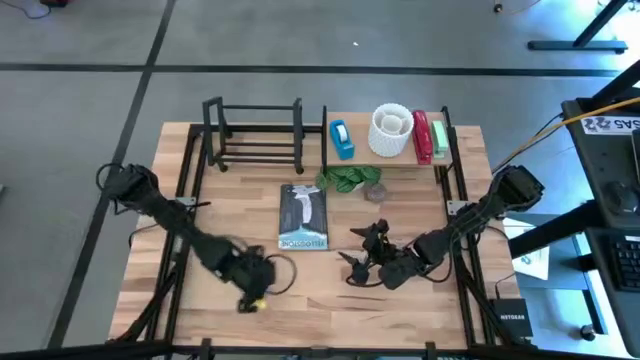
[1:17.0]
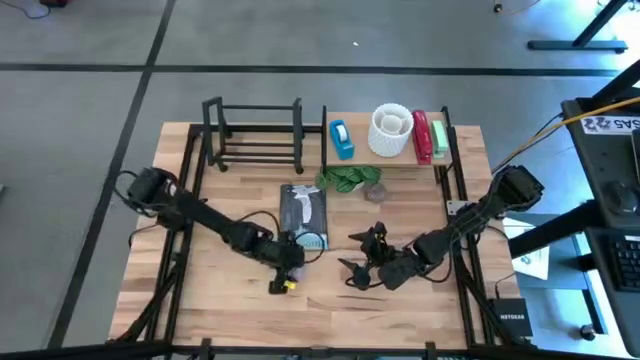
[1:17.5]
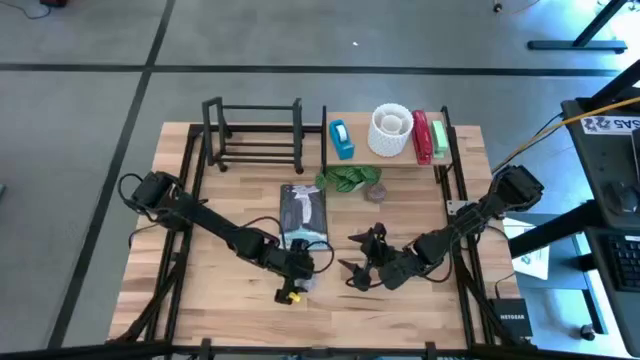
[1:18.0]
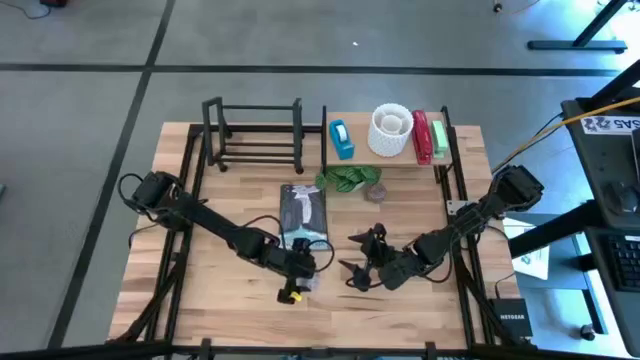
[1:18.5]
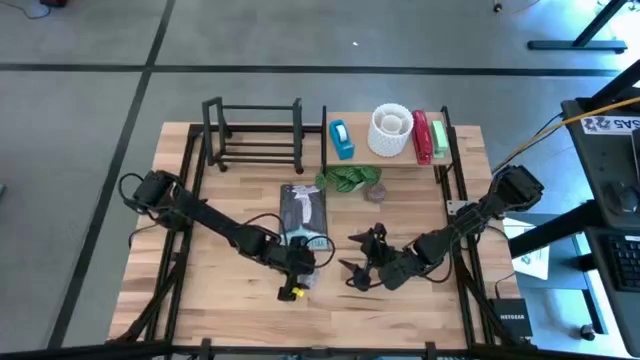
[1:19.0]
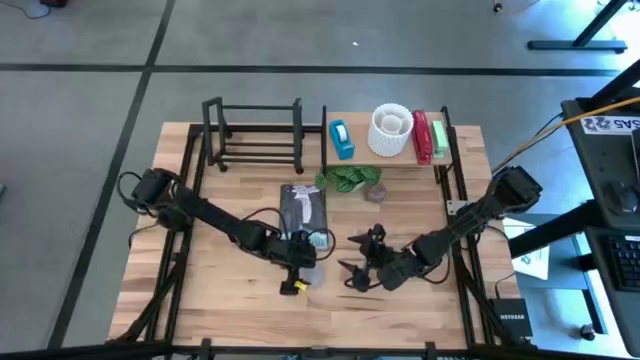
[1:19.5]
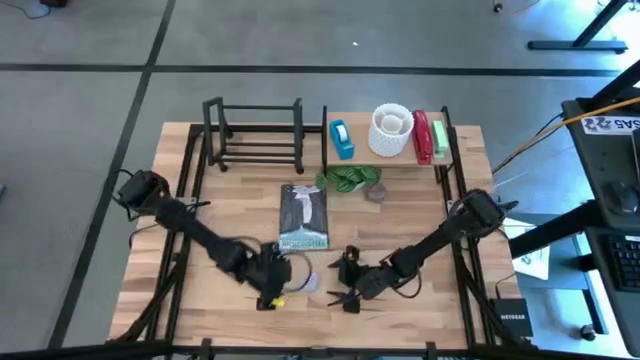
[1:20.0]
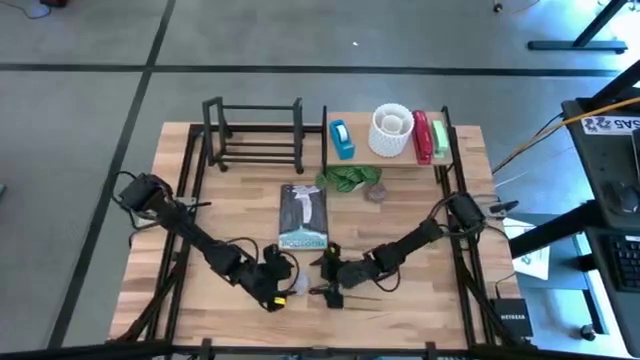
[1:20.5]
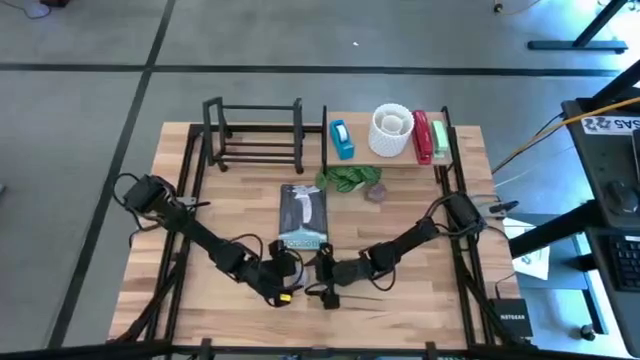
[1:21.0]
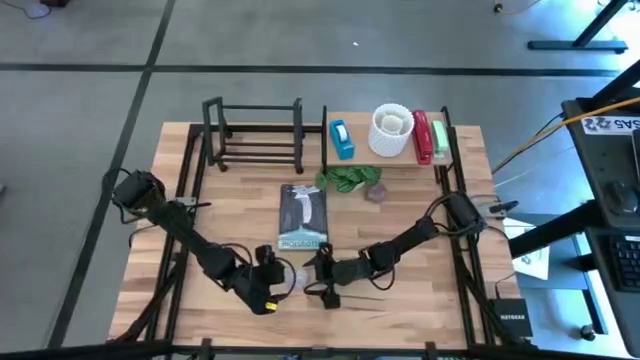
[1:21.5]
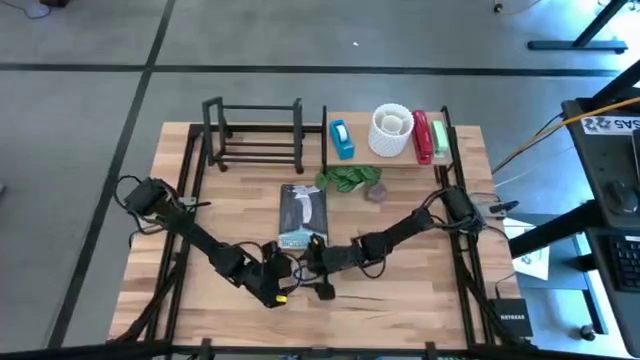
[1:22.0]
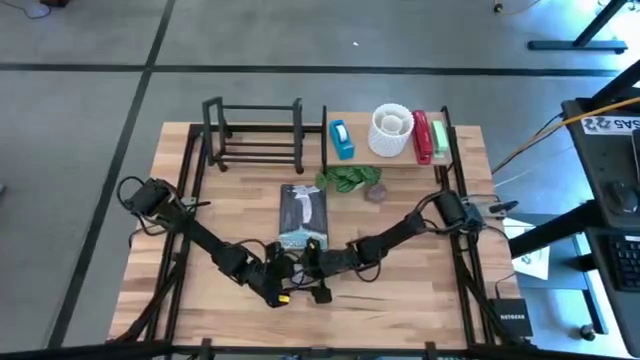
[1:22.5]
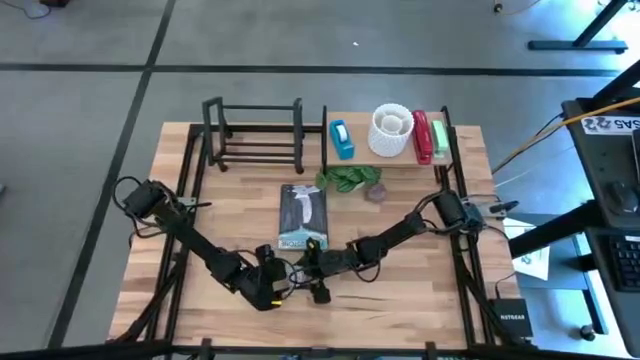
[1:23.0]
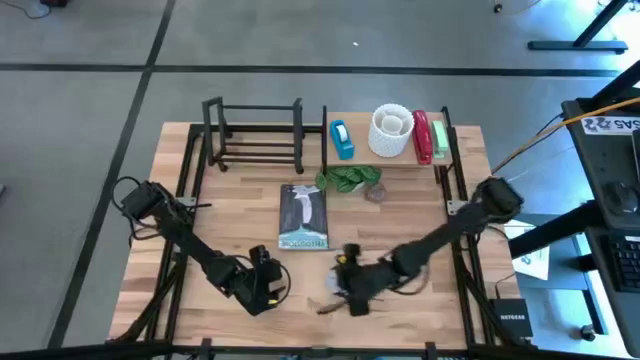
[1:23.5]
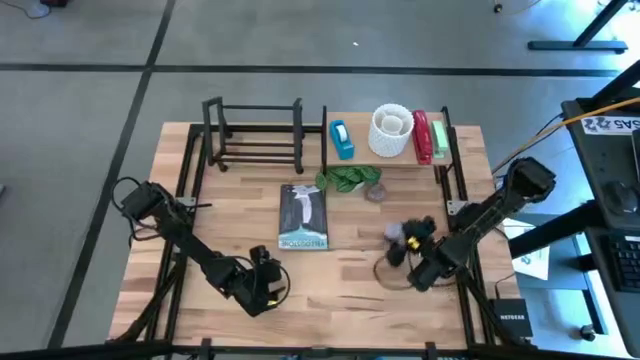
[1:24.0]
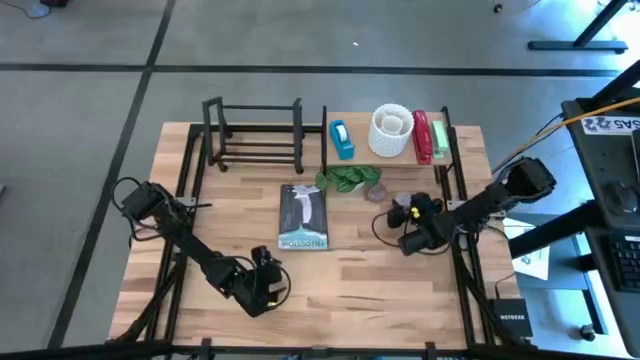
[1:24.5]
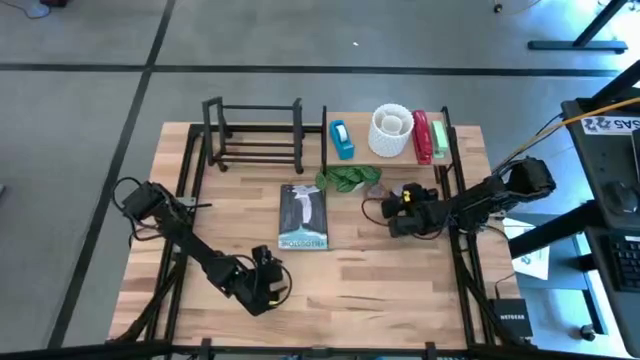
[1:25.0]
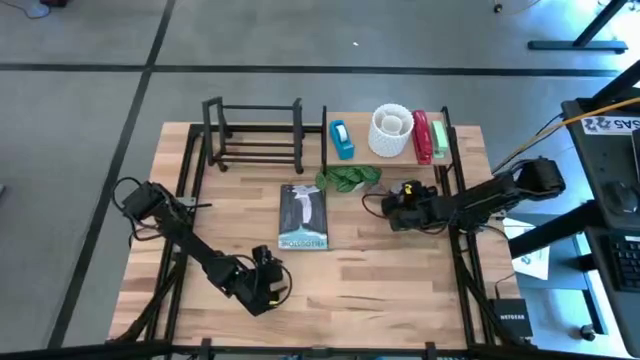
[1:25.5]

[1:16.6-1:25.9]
Task: Stock shelves
Put the white patterned scented candle below the shelf

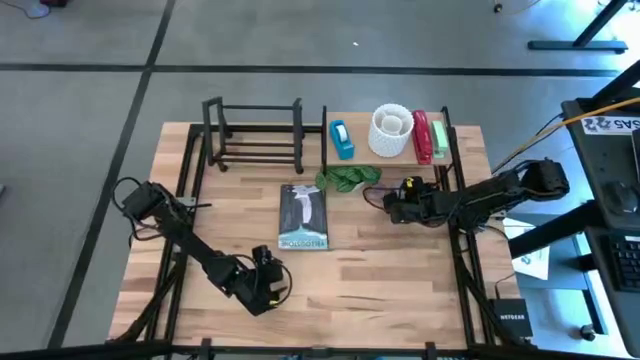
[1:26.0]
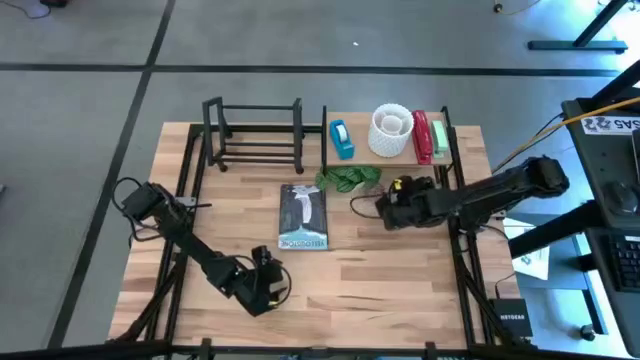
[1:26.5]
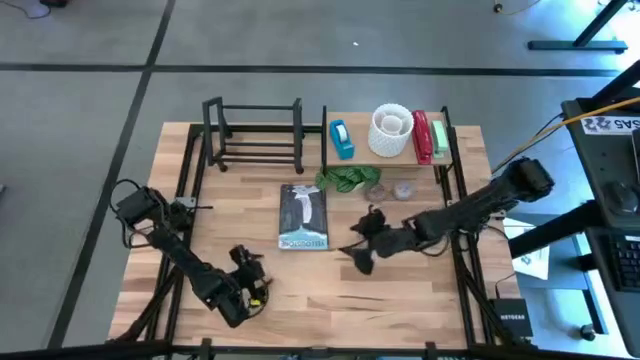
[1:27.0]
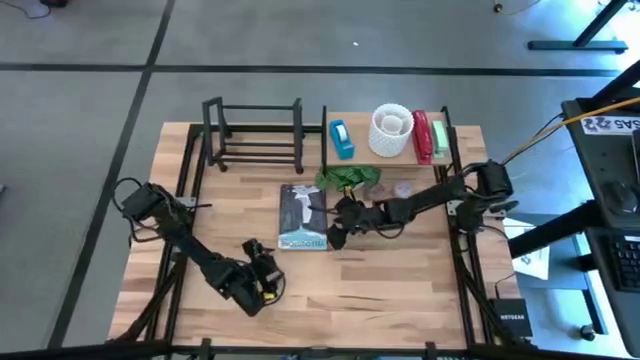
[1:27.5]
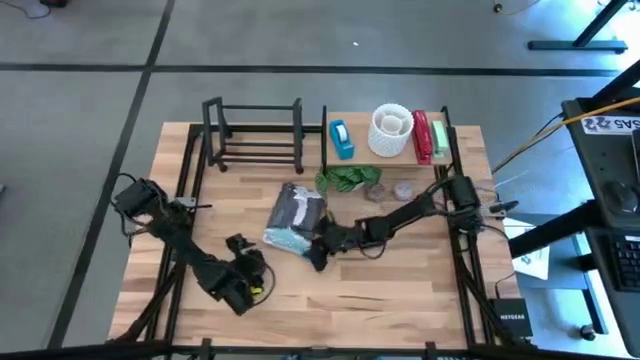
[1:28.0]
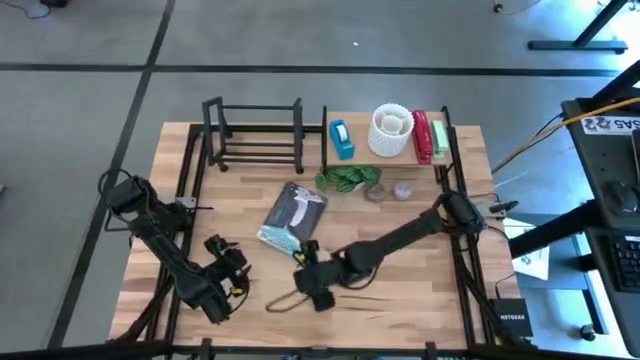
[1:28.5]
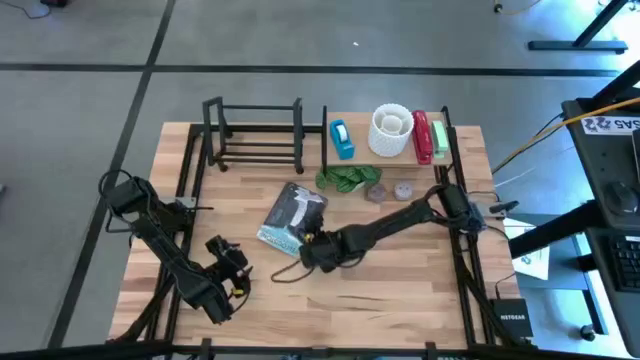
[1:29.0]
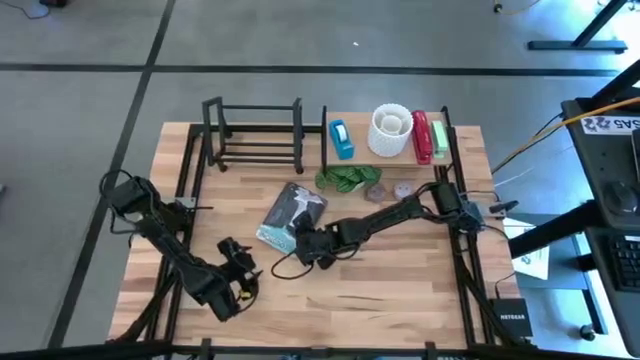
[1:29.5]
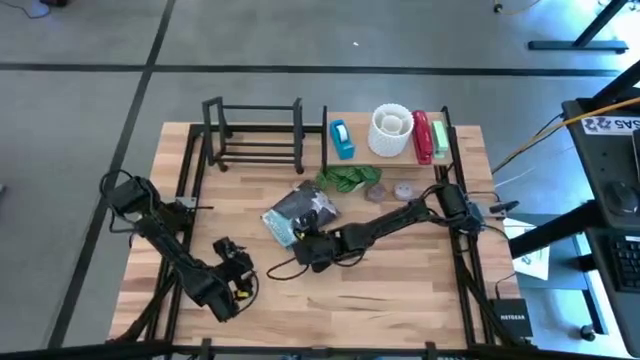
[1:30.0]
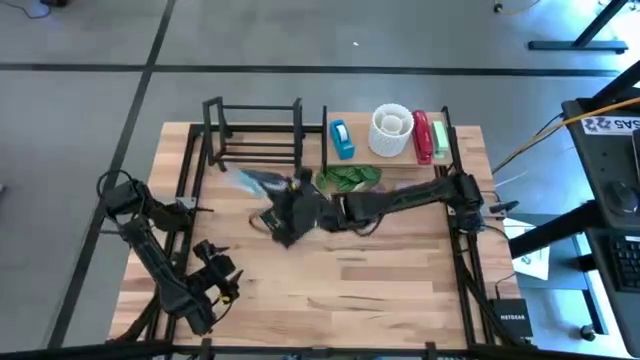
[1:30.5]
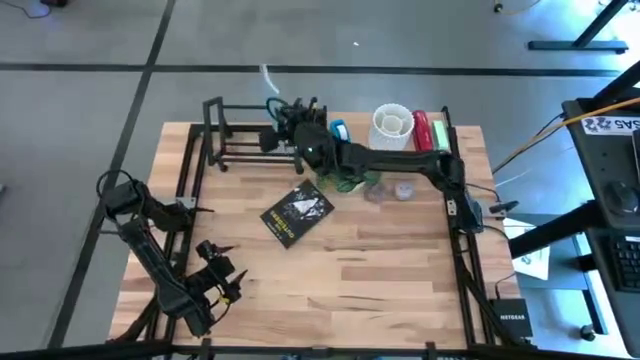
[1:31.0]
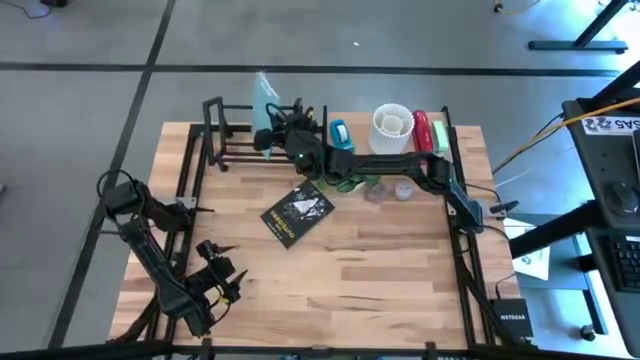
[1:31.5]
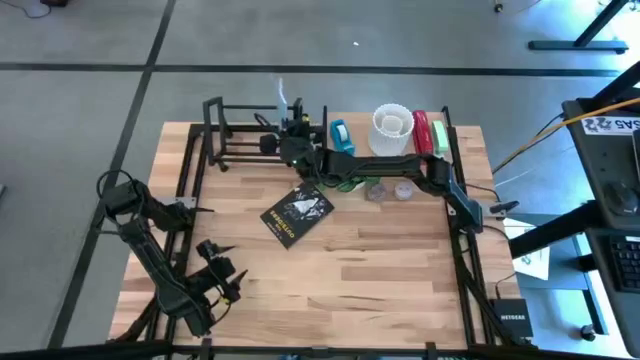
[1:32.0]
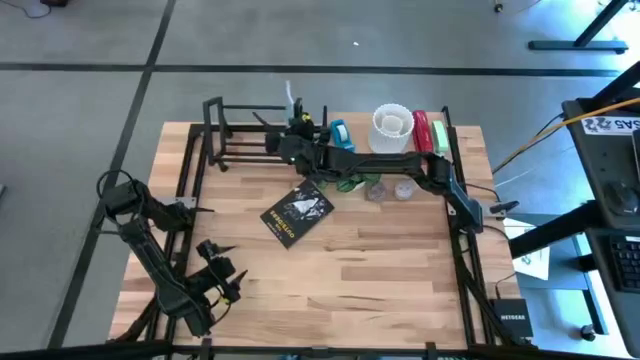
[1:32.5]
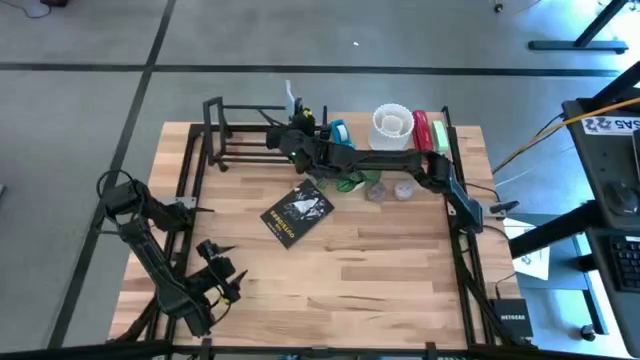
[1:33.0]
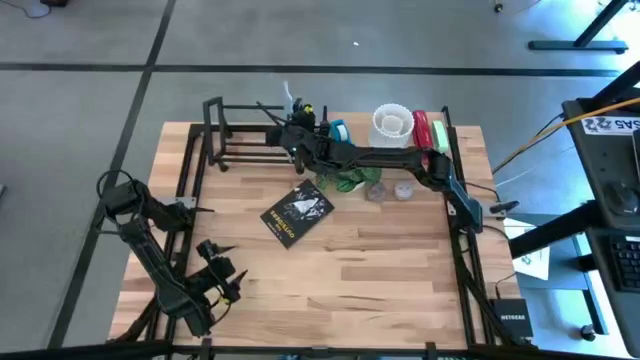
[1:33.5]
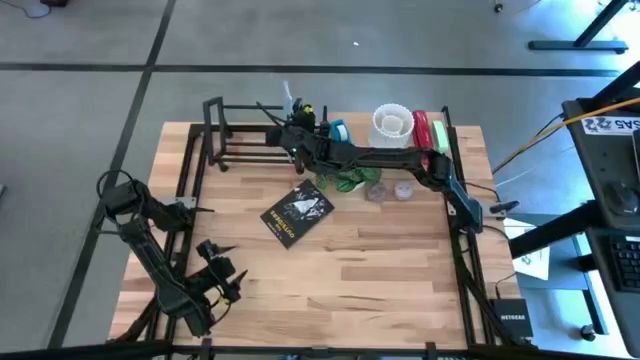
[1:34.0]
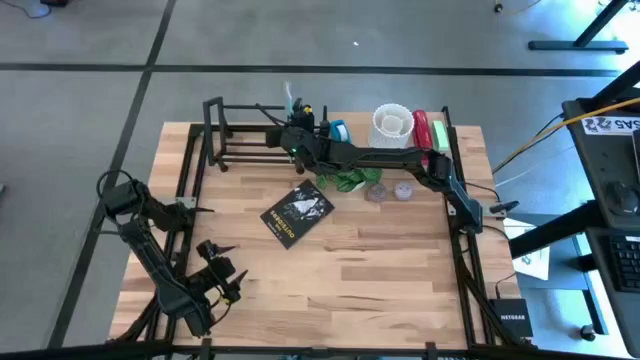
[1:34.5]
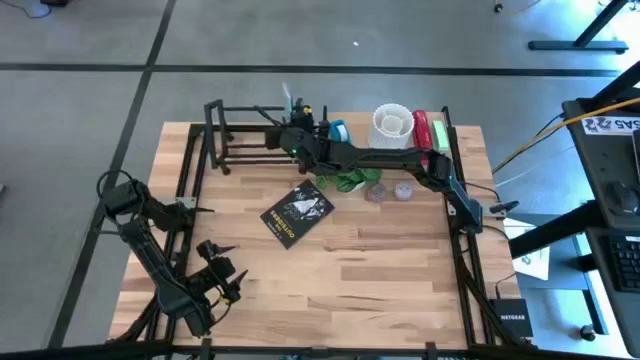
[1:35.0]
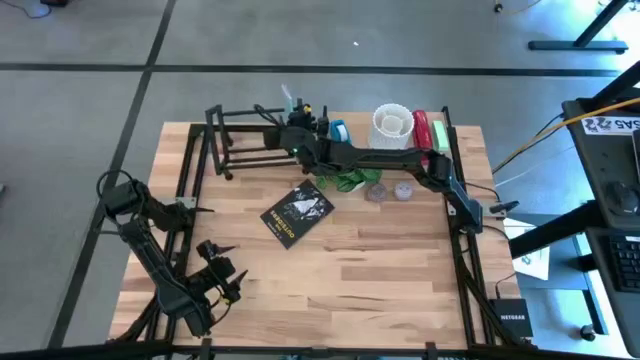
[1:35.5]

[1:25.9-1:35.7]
Put the blue book on the bookshelf

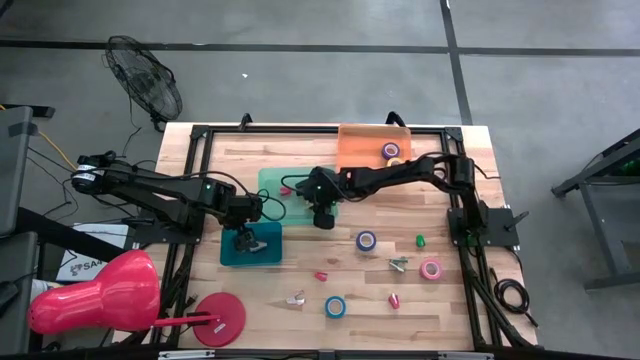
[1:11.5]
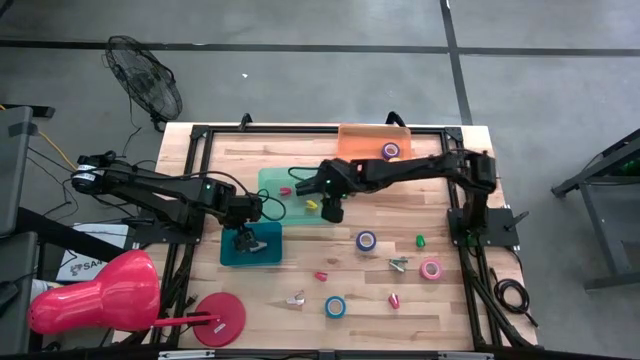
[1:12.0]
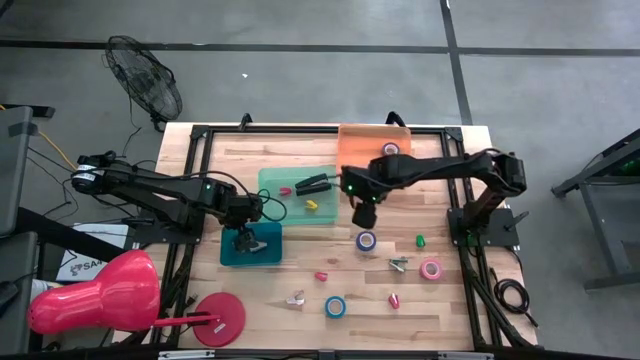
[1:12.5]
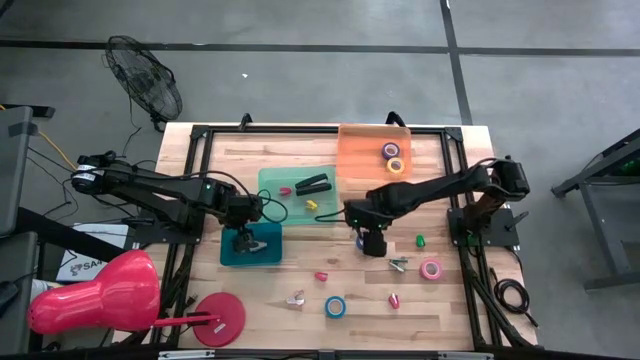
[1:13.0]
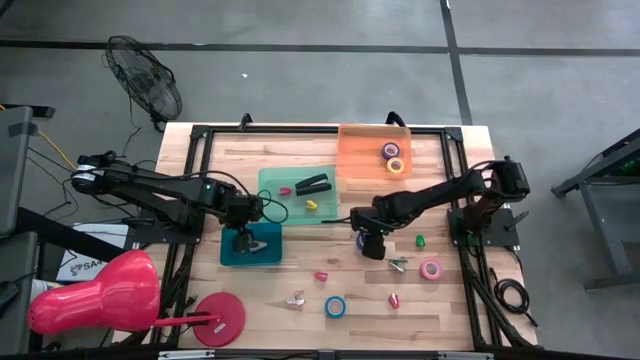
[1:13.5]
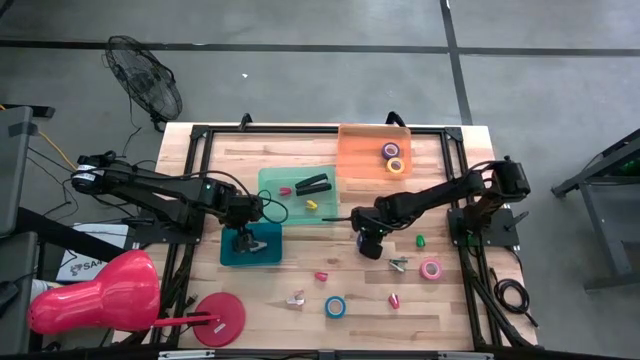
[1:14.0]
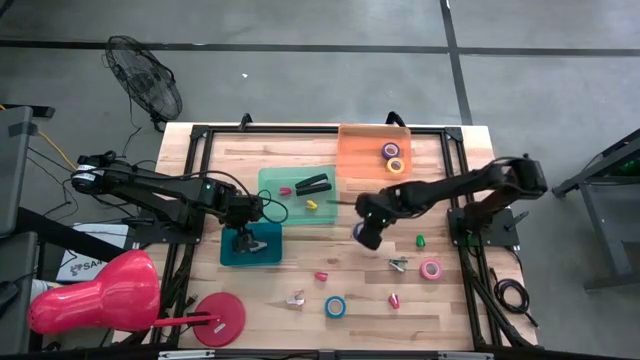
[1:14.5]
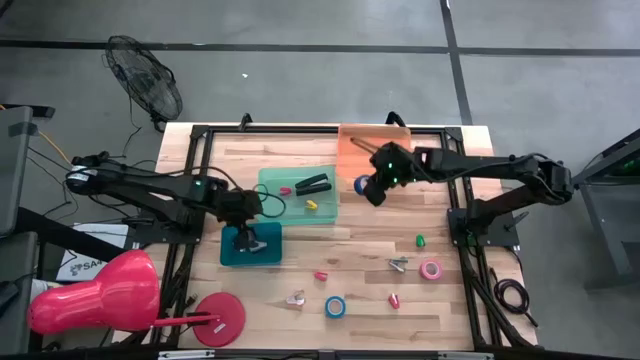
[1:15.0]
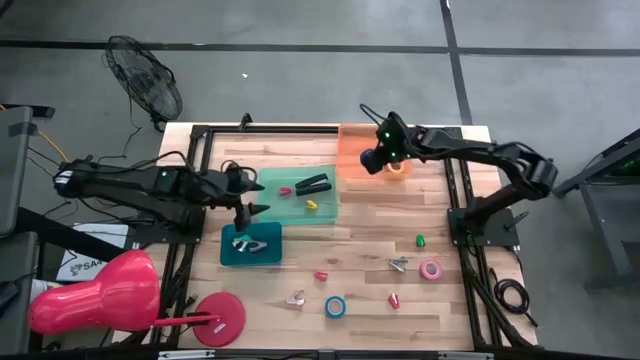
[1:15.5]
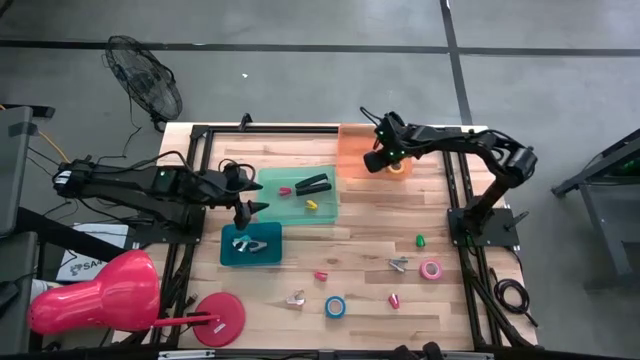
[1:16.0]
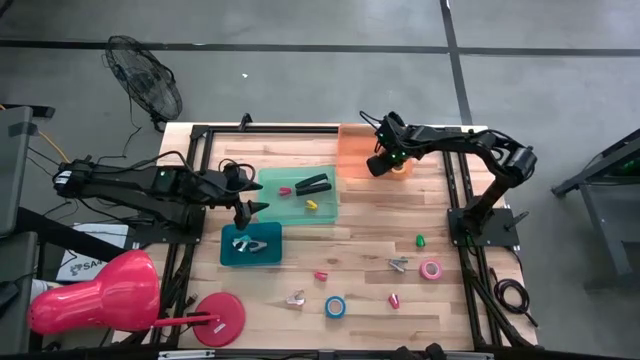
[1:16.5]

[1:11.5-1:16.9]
Task: Pick and place Stapler, Stapler remover, tape
Put the blue tape in the orange bin
